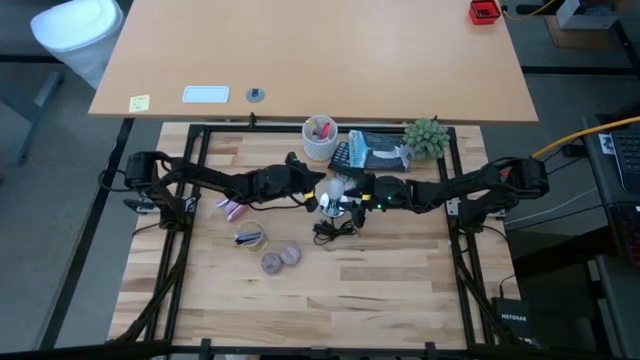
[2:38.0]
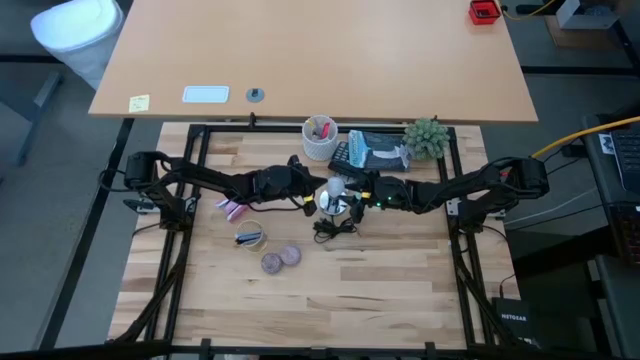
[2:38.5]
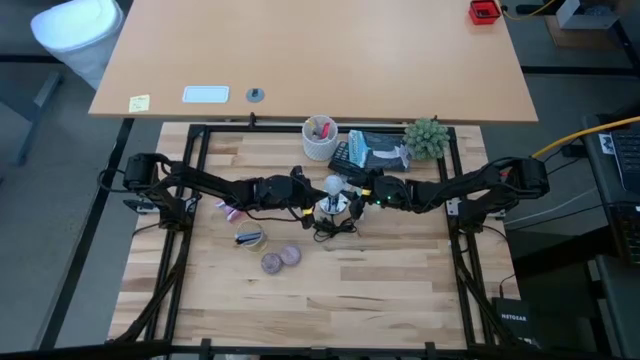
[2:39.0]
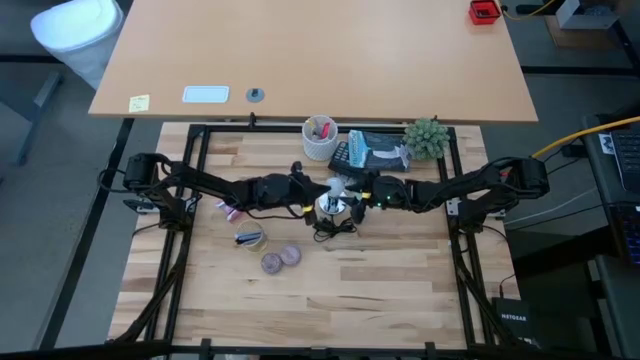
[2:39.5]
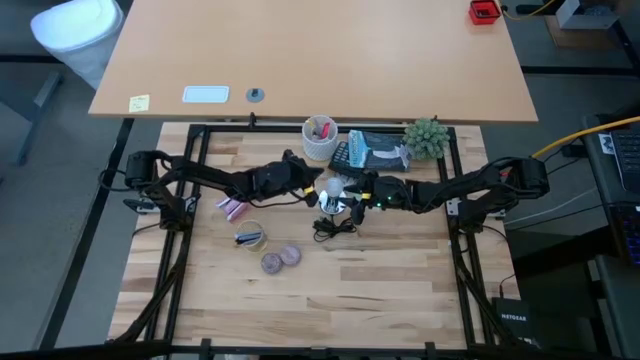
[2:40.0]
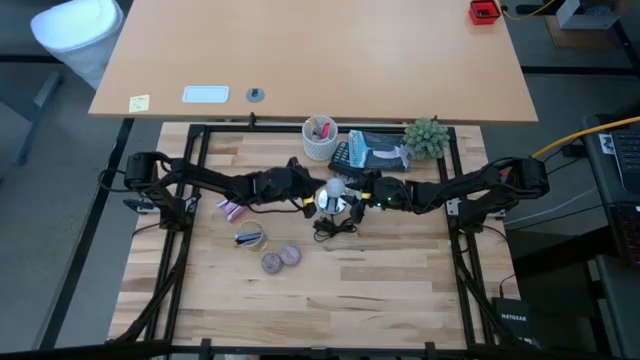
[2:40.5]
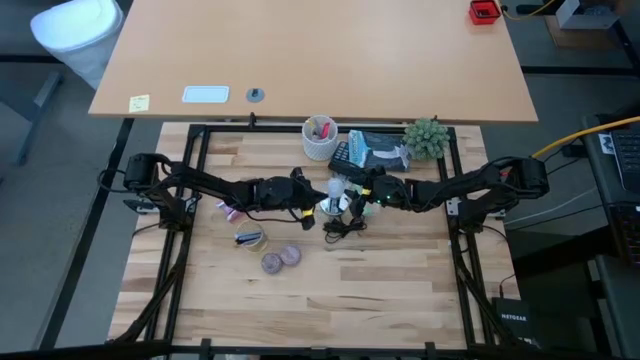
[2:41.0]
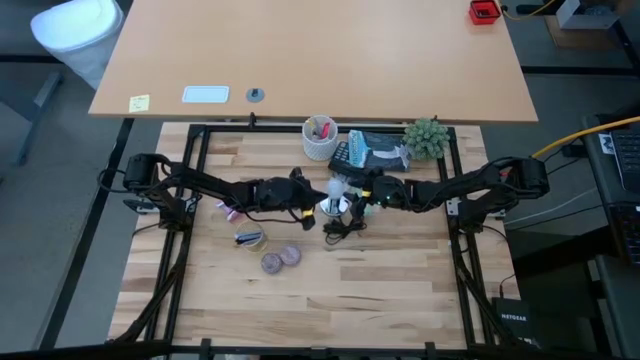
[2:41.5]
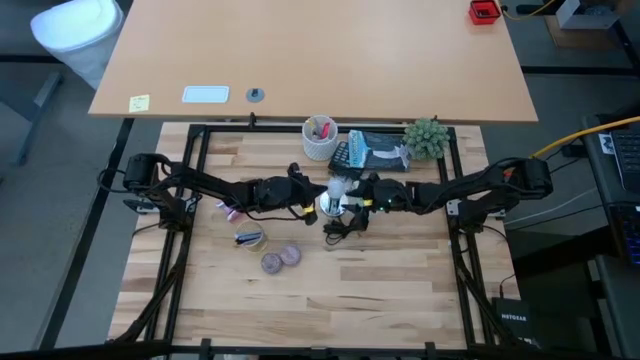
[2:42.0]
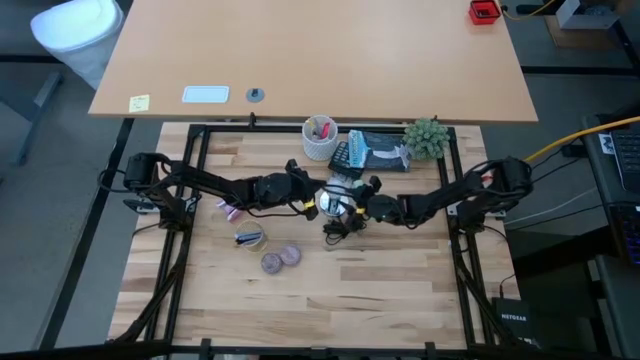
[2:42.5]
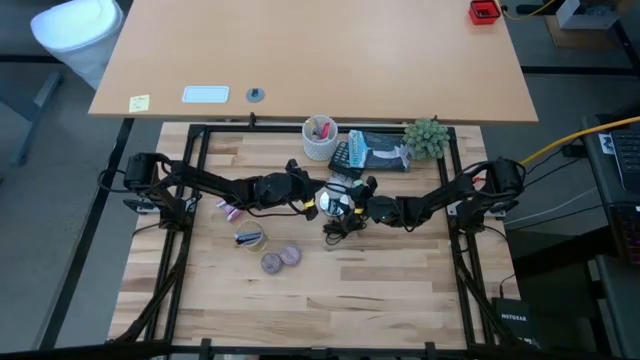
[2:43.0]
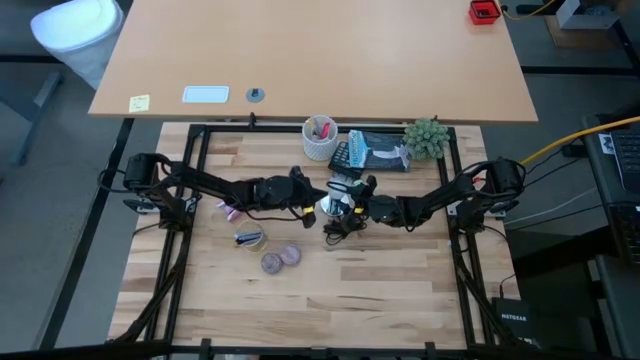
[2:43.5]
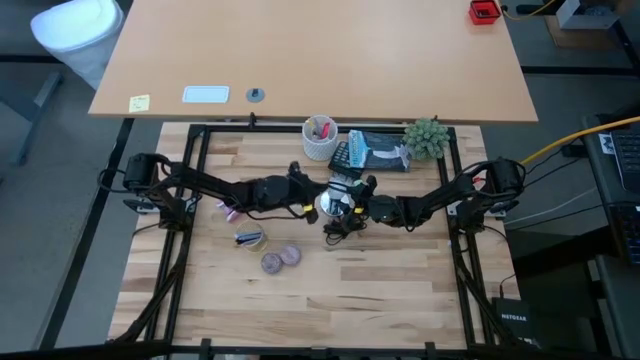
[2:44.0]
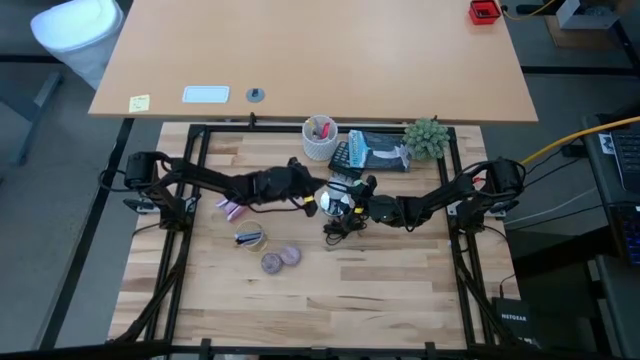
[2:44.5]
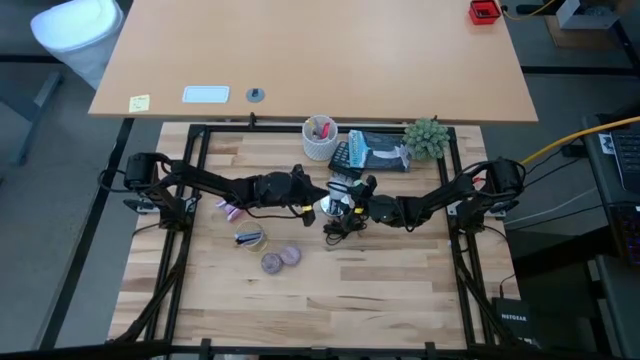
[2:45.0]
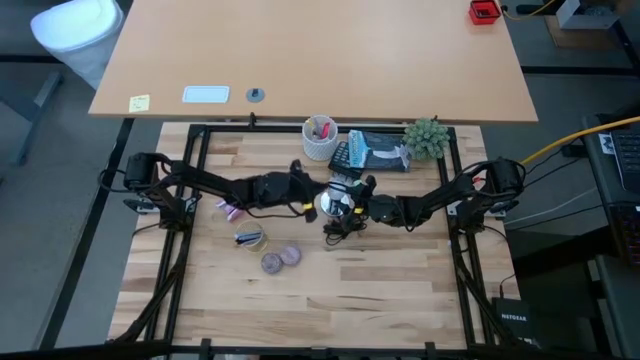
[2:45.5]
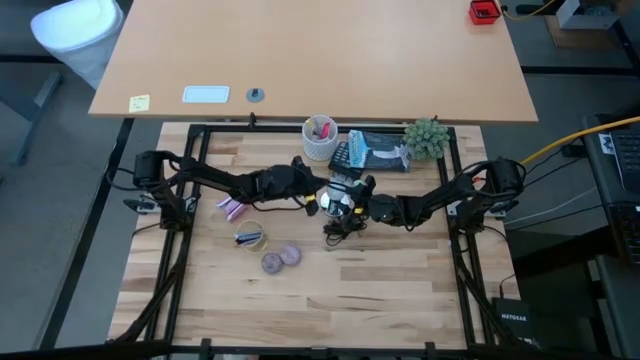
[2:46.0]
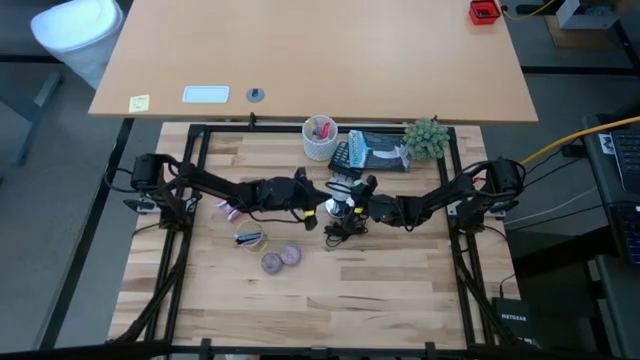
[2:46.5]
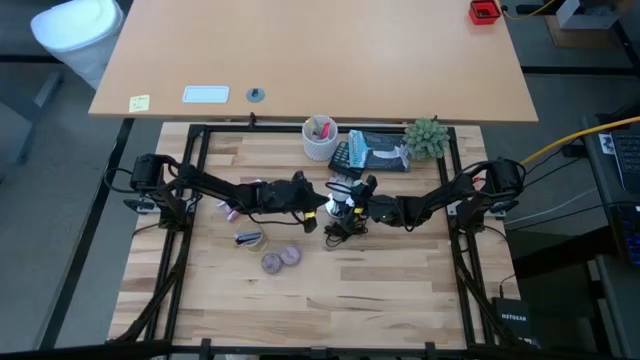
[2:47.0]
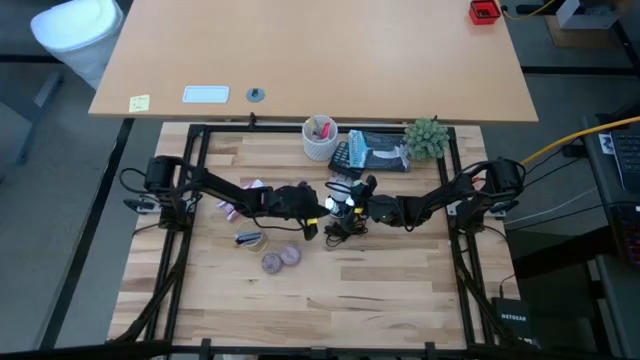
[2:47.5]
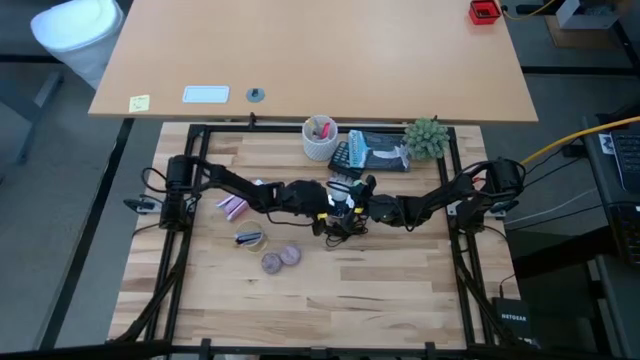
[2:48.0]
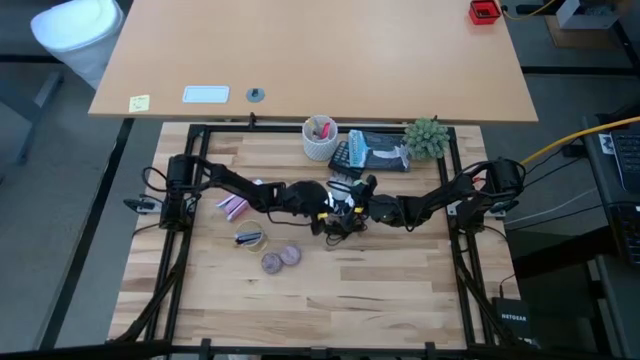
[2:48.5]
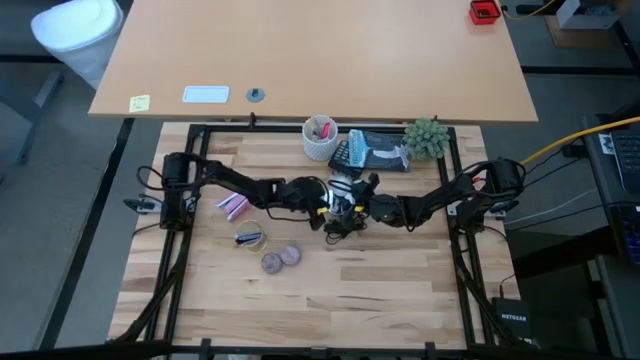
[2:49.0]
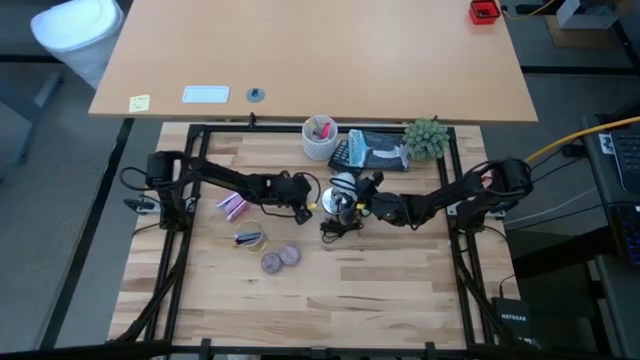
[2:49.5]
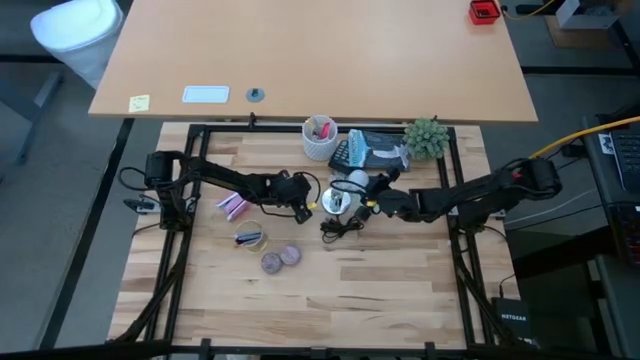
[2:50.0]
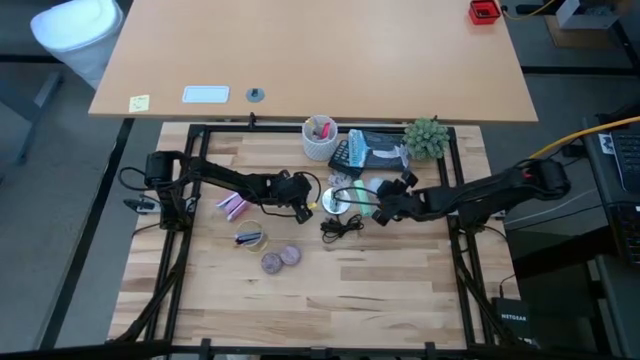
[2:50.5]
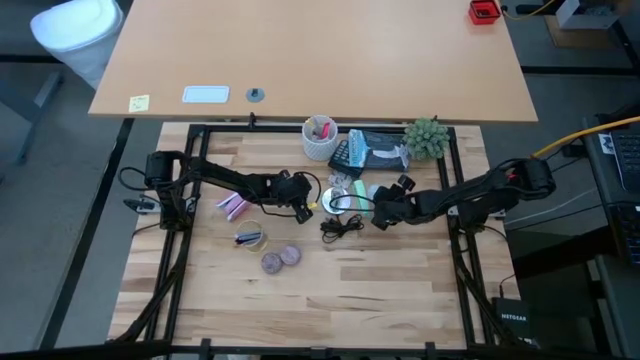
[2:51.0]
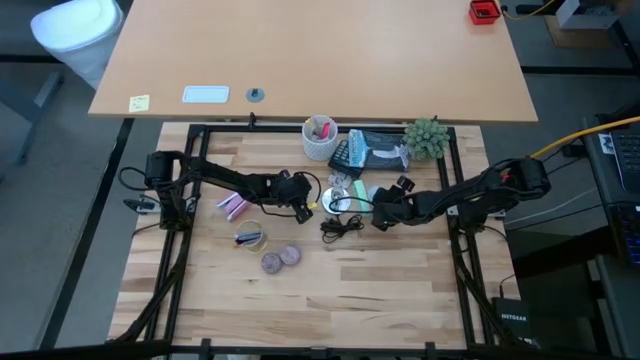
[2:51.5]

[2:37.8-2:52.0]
Task: Screw lightbulb
Remove the white lightbulb from the silver lamp

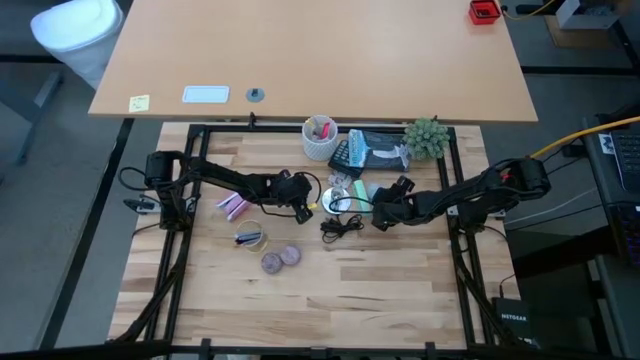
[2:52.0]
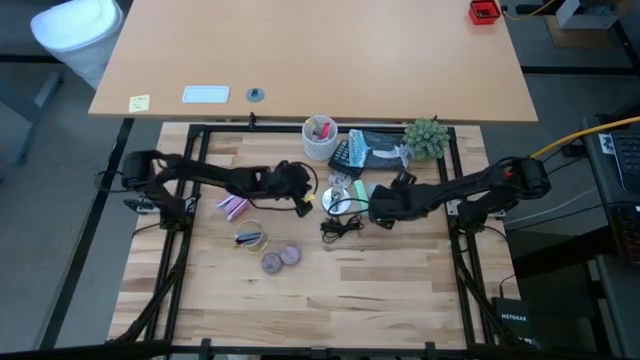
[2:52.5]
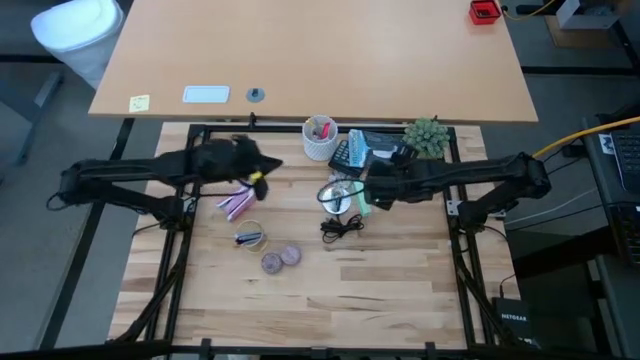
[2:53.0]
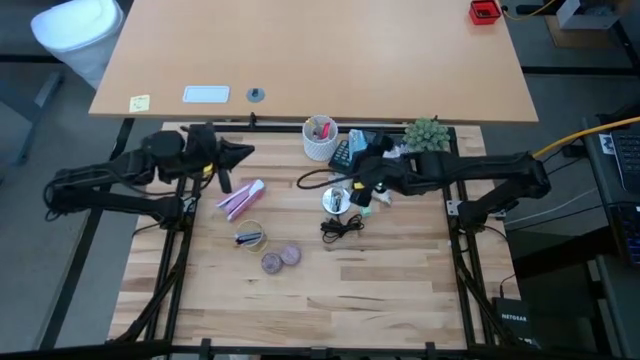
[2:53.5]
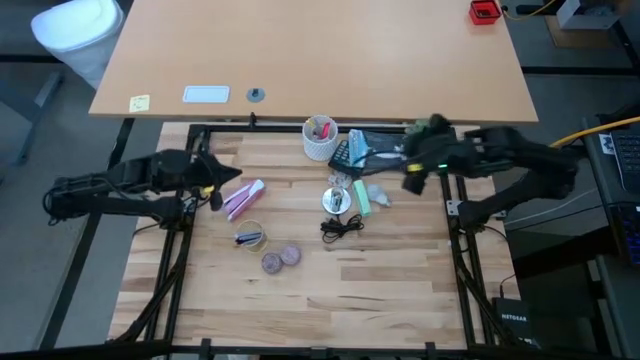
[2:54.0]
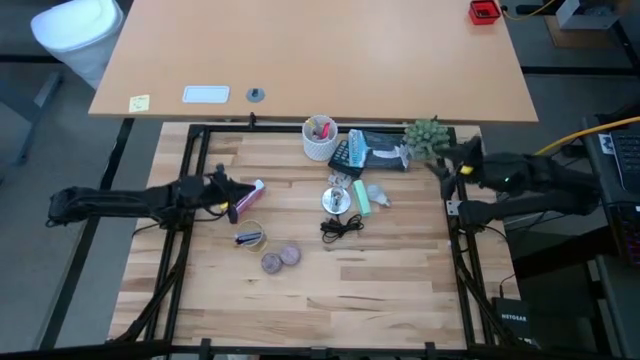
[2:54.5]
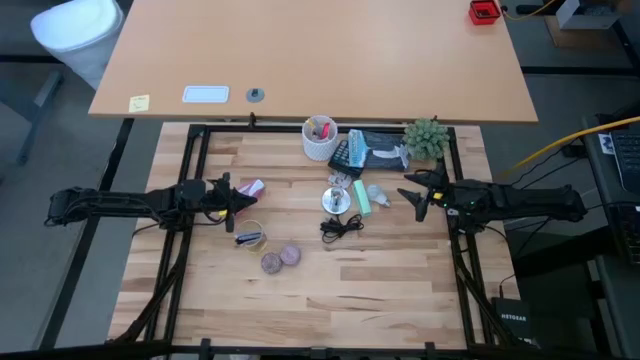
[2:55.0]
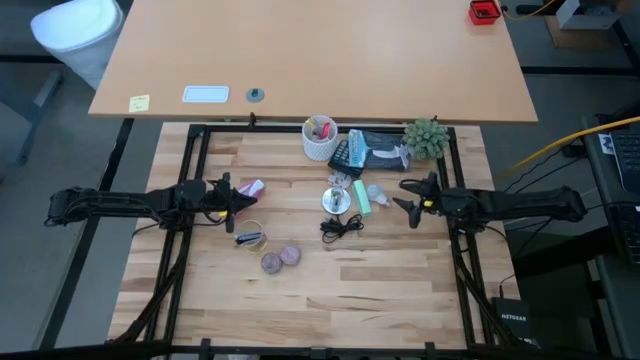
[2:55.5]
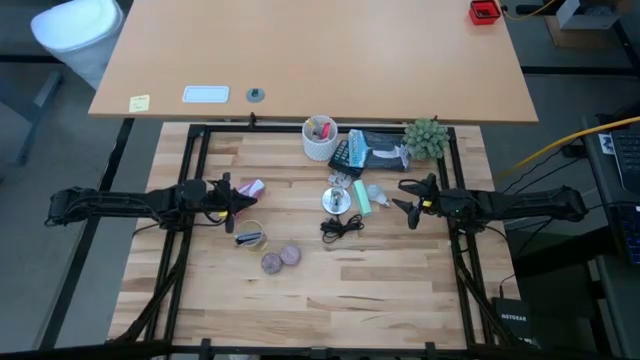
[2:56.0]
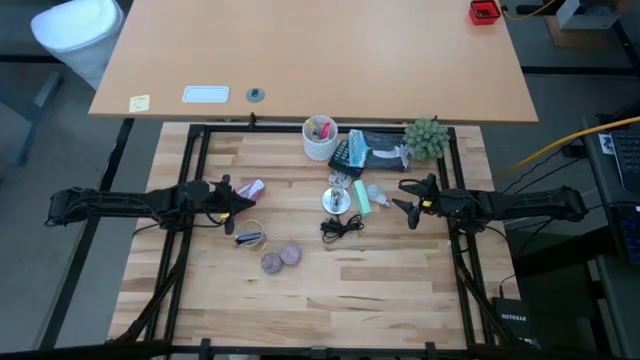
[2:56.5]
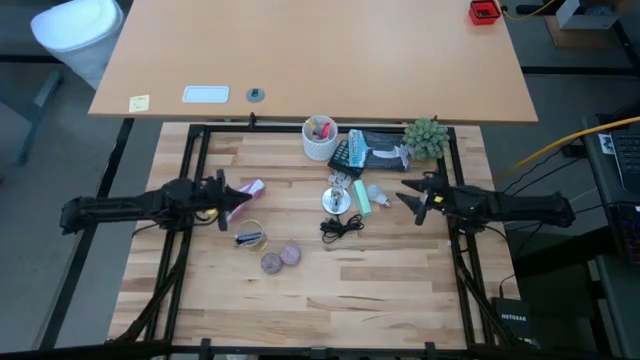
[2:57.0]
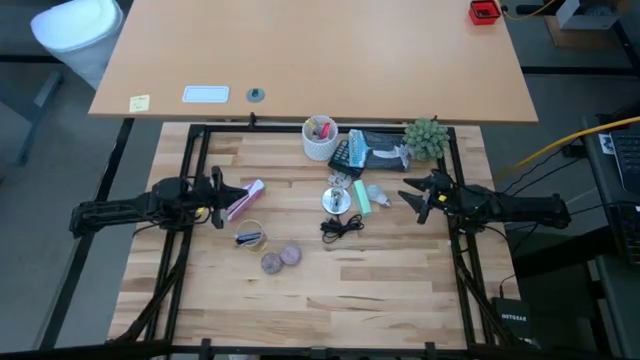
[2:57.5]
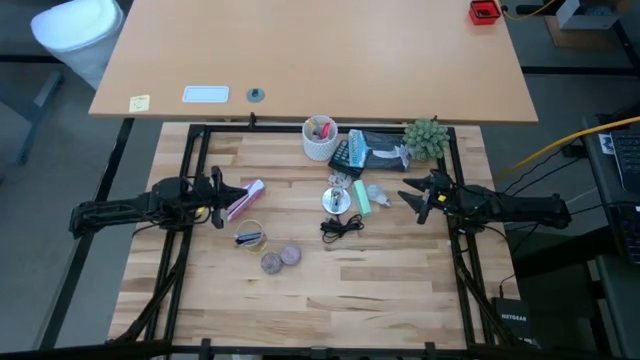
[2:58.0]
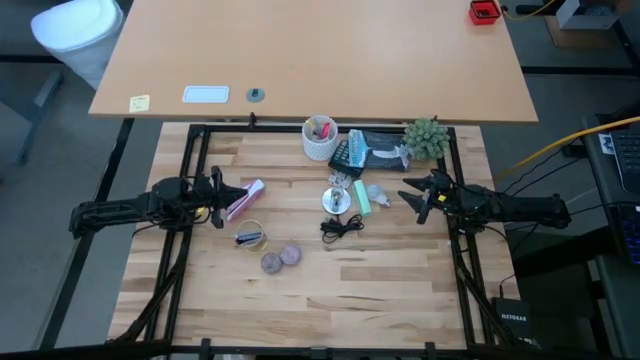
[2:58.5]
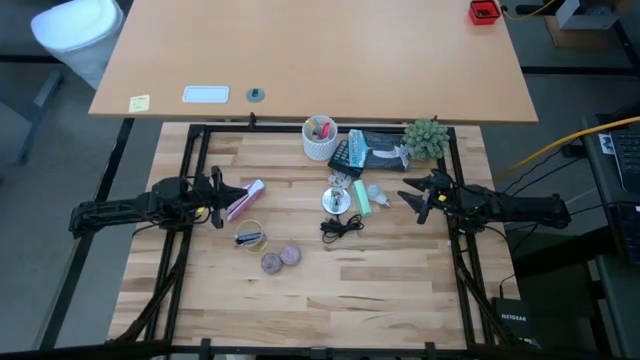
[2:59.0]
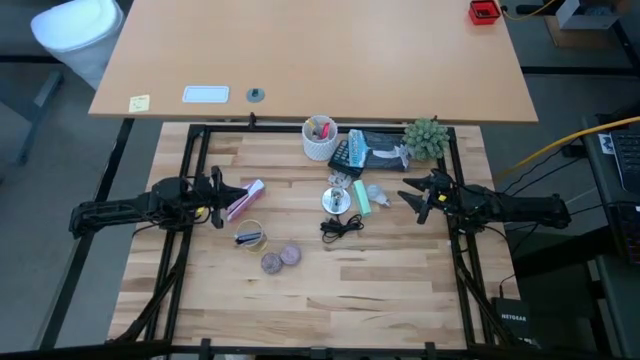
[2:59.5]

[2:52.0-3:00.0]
Return to Home Position
